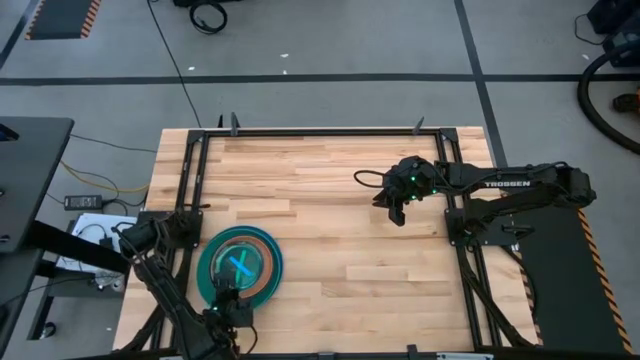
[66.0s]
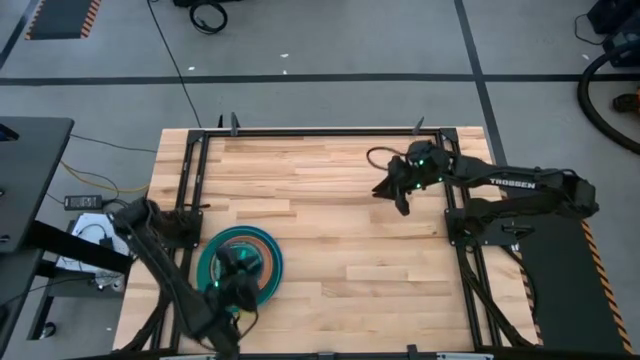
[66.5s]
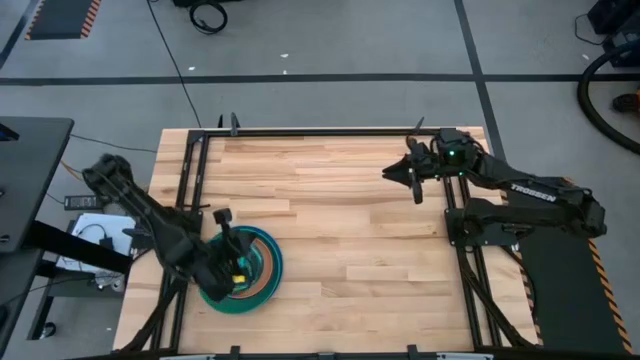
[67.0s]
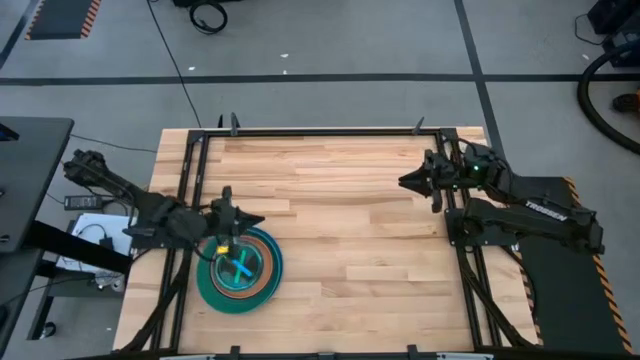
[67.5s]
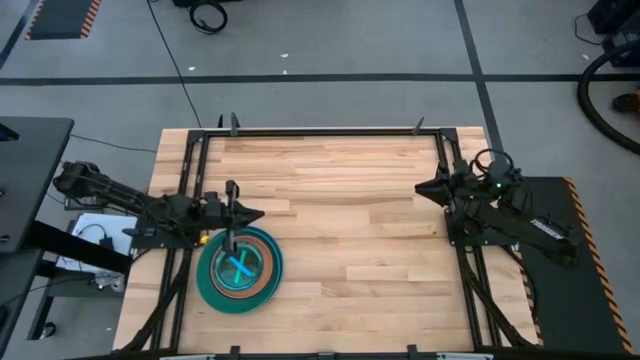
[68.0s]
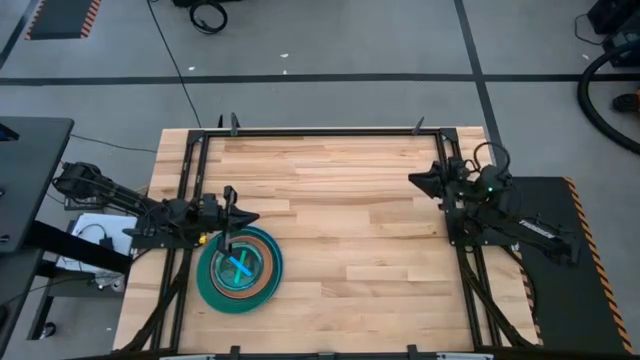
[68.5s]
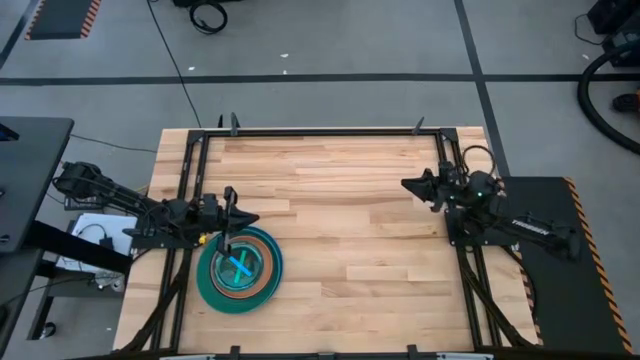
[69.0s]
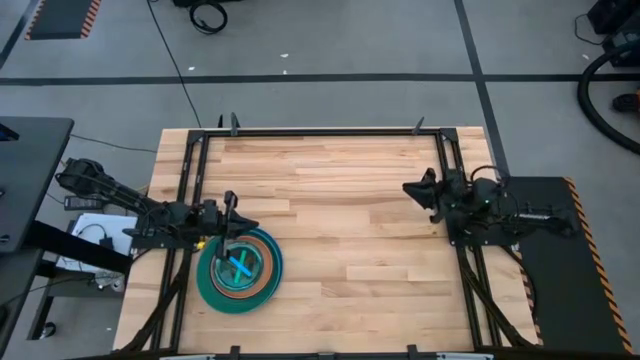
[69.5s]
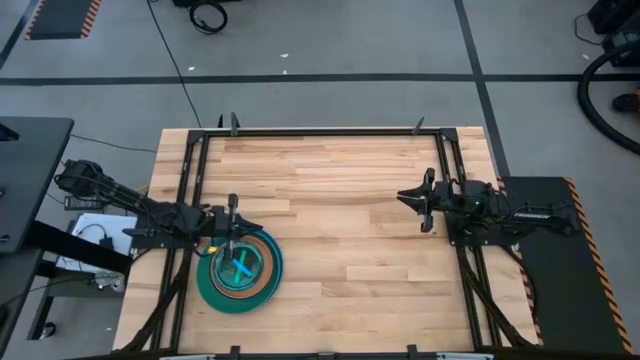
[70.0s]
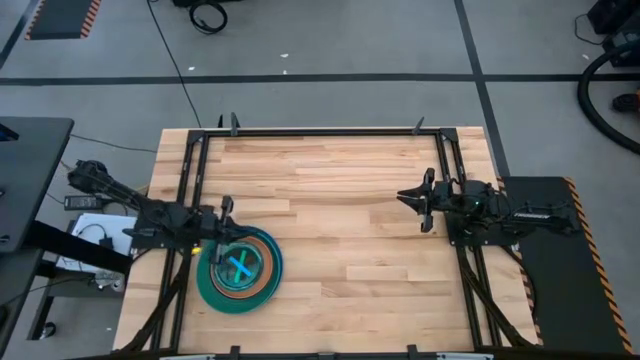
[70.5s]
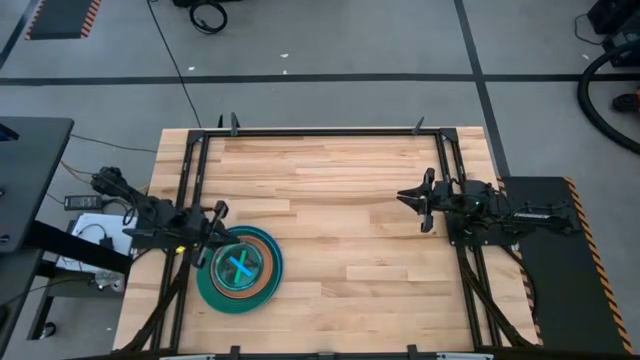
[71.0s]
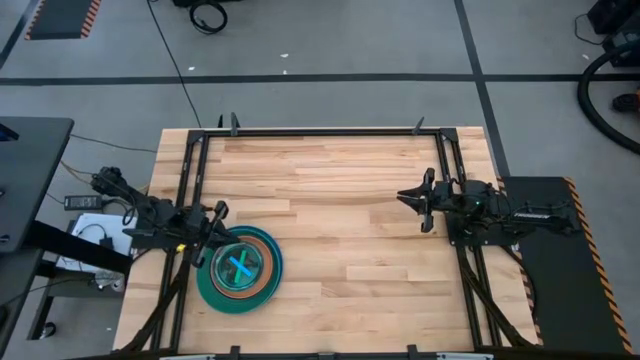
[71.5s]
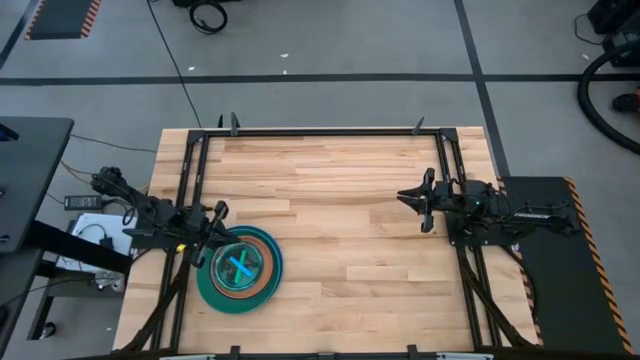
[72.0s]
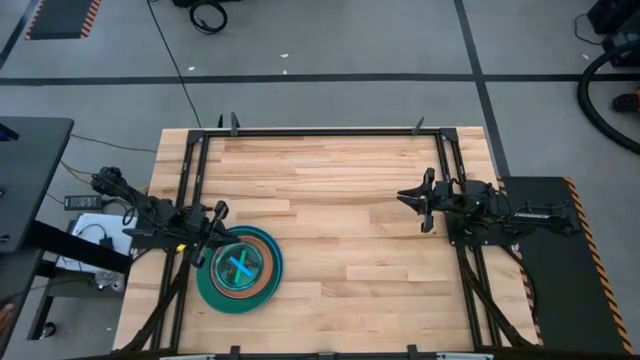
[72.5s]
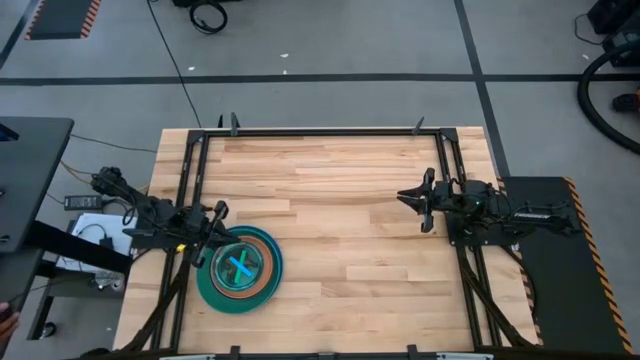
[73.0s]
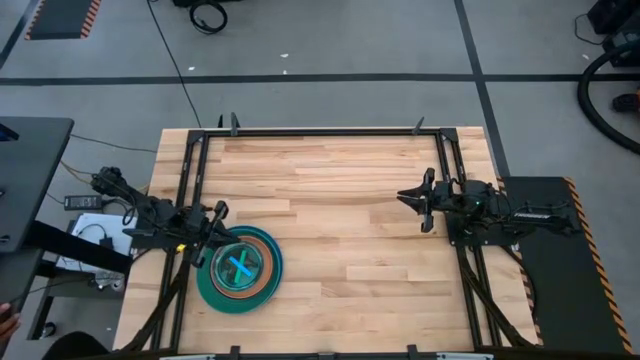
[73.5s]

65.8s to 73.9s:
Task: Stack plastic plates
Return to Home Position

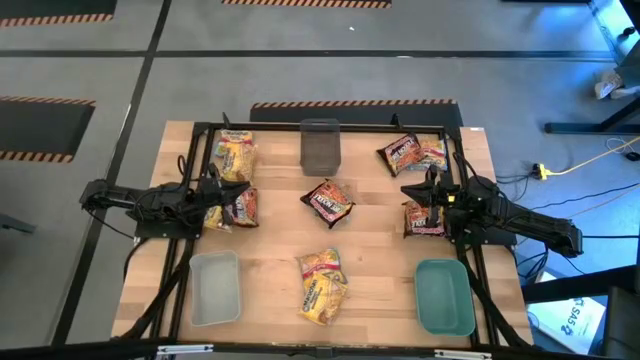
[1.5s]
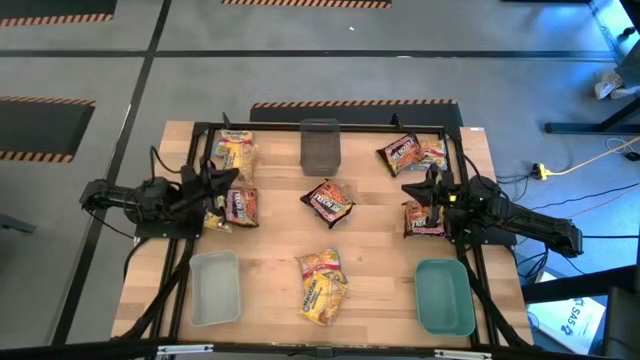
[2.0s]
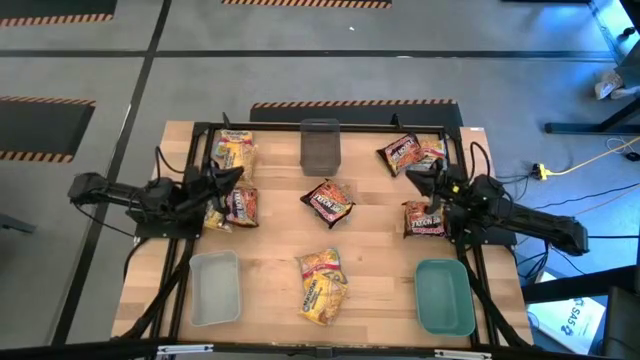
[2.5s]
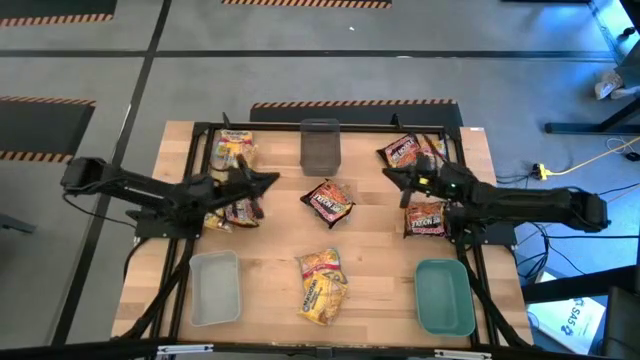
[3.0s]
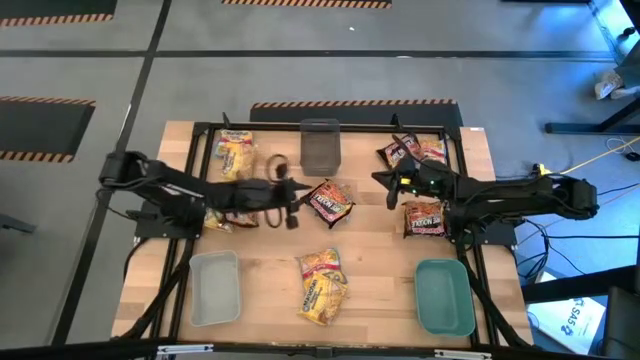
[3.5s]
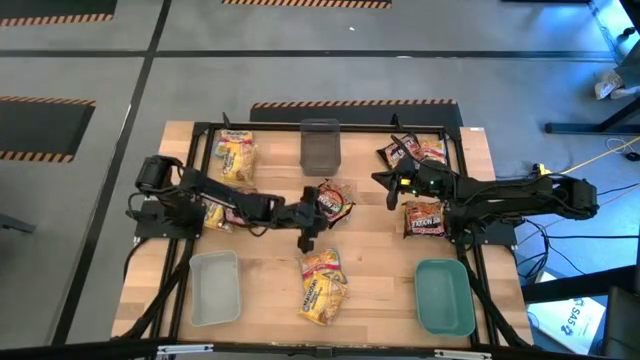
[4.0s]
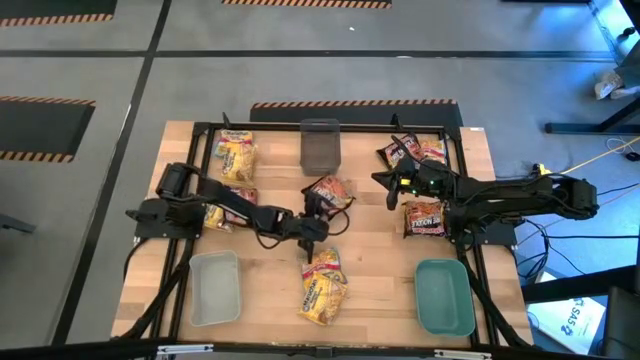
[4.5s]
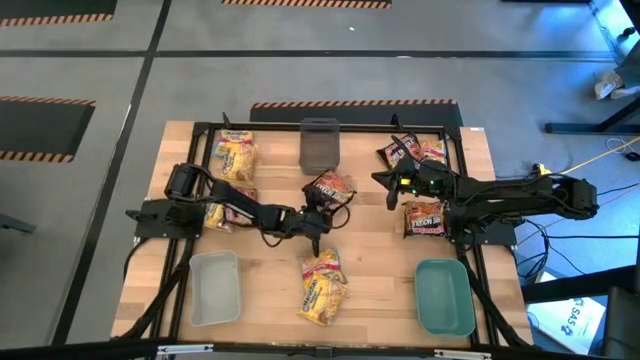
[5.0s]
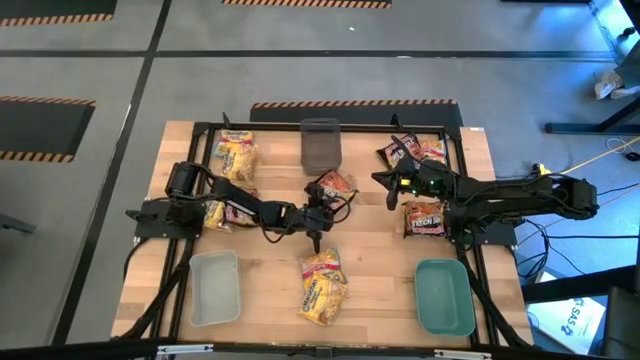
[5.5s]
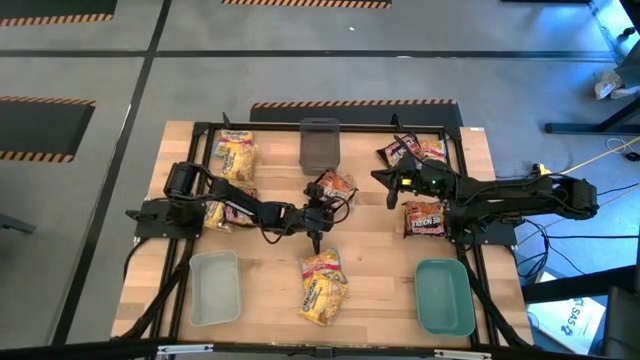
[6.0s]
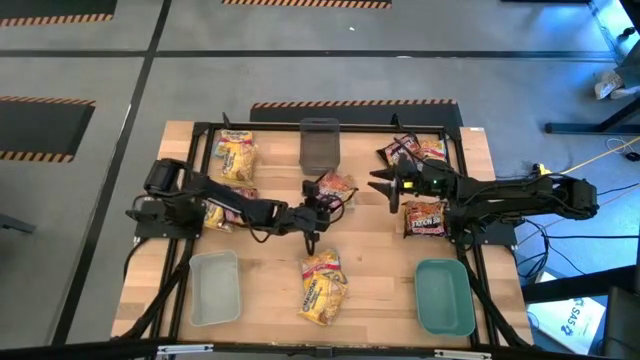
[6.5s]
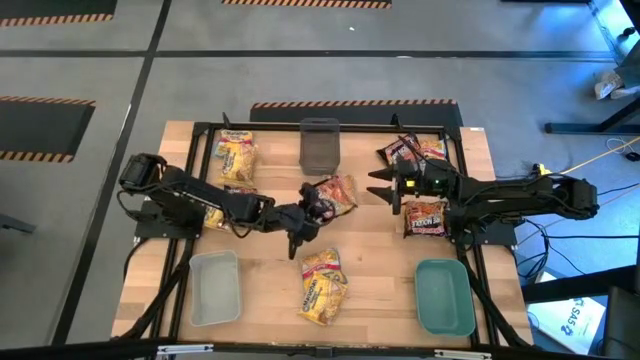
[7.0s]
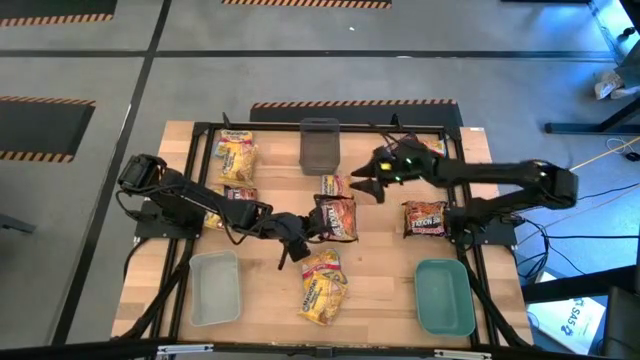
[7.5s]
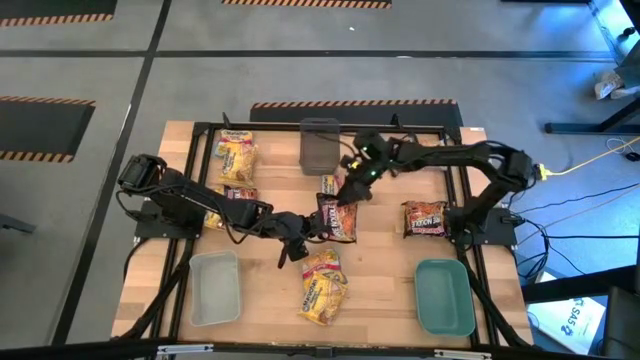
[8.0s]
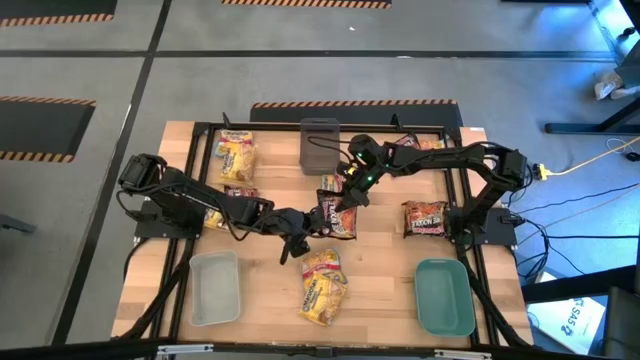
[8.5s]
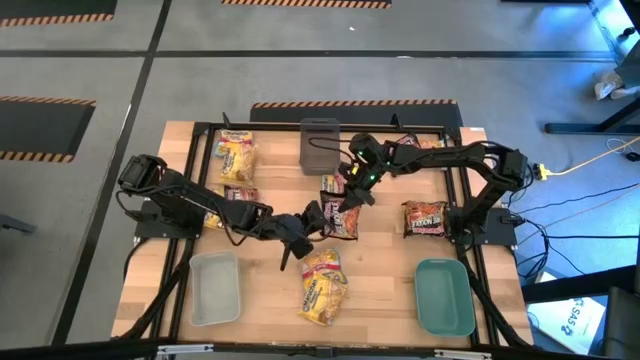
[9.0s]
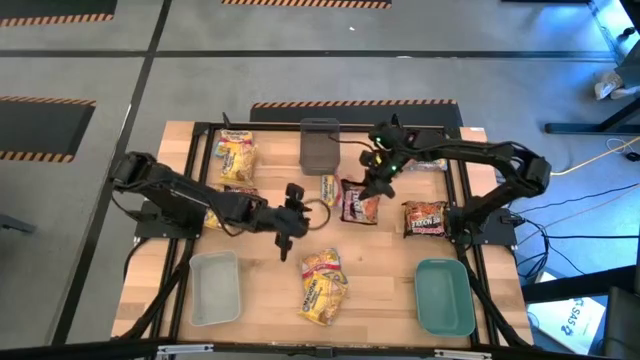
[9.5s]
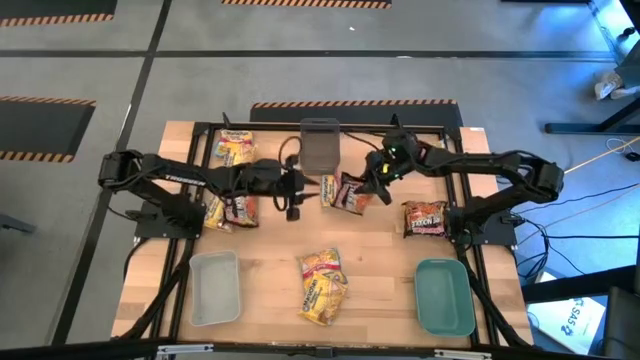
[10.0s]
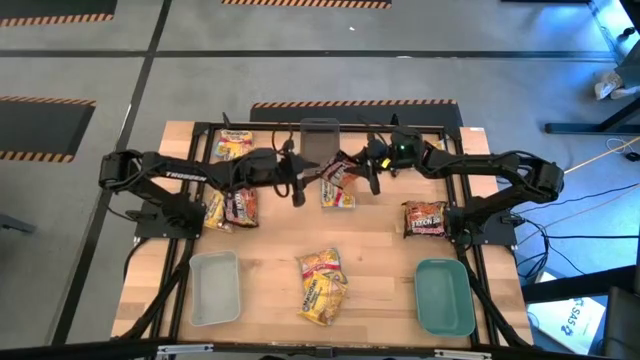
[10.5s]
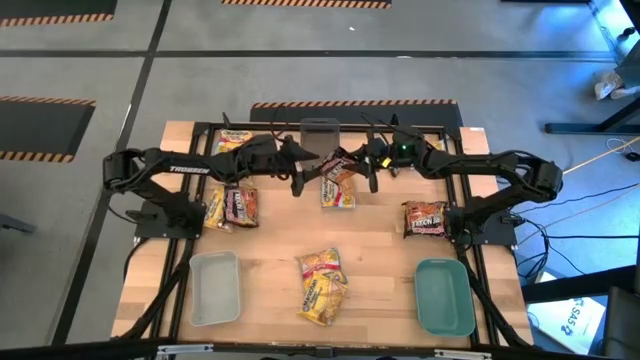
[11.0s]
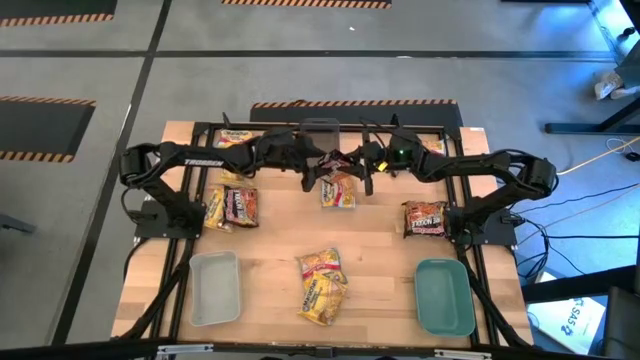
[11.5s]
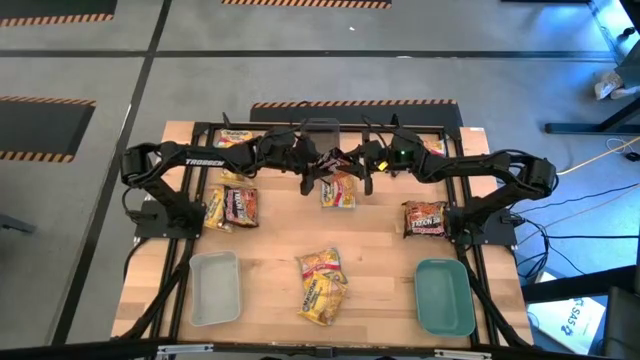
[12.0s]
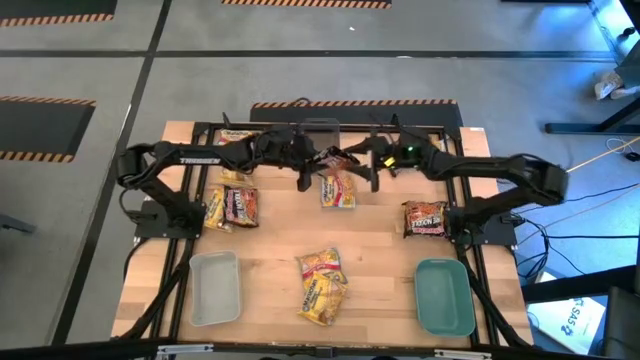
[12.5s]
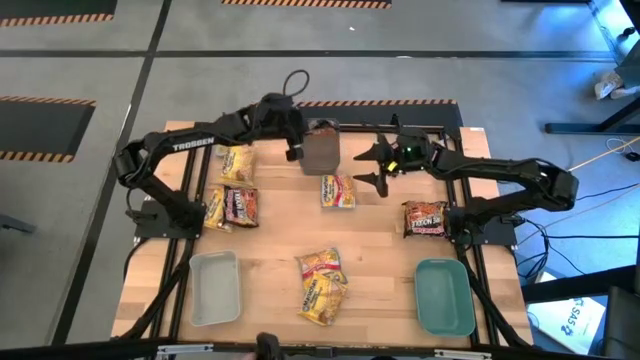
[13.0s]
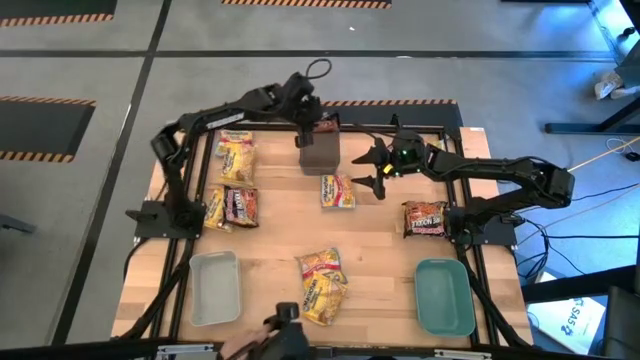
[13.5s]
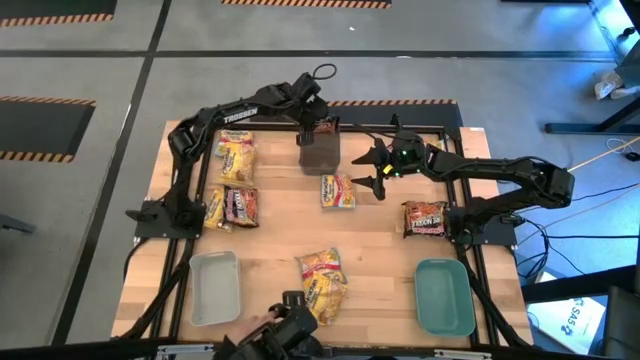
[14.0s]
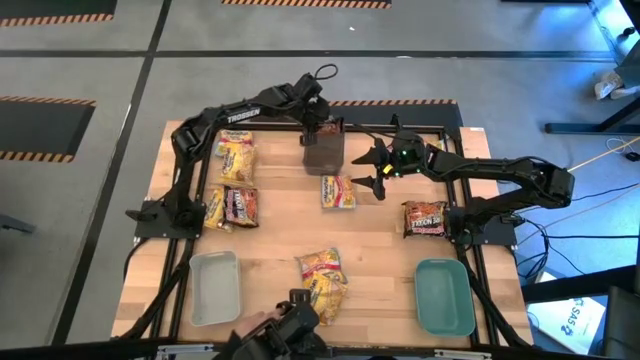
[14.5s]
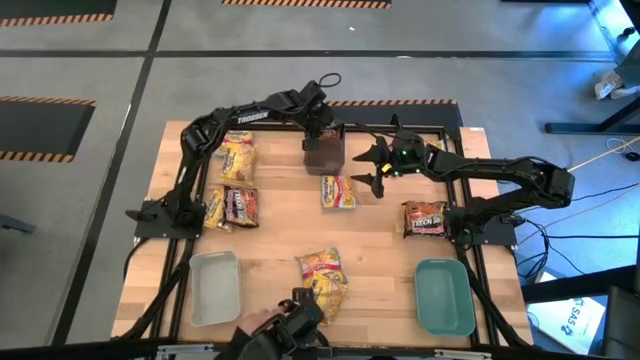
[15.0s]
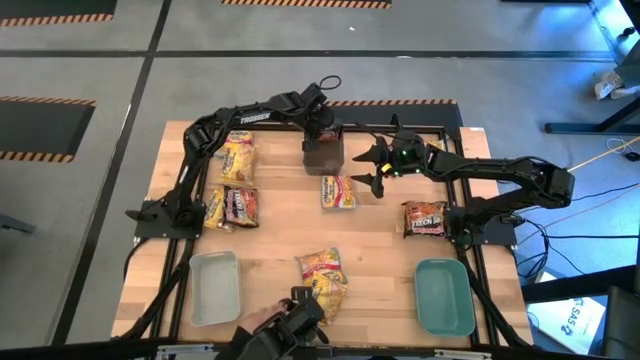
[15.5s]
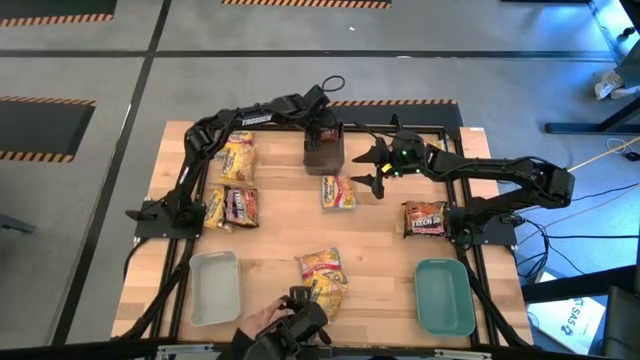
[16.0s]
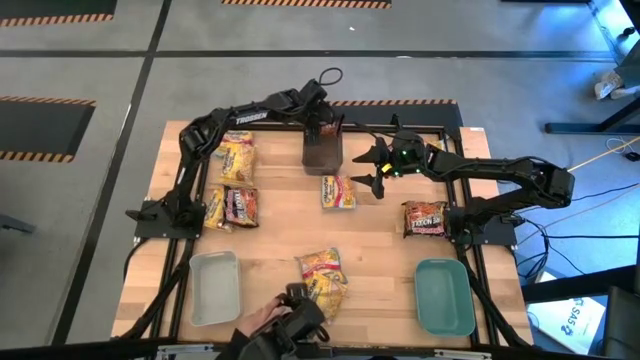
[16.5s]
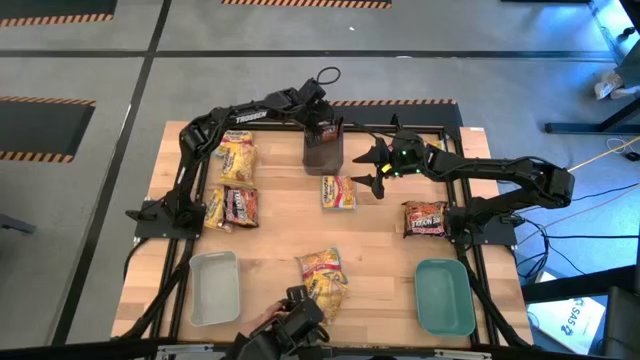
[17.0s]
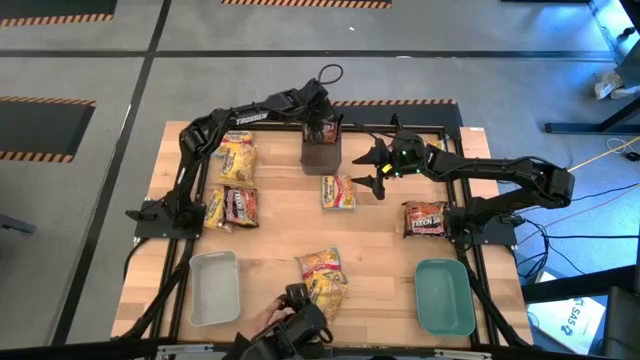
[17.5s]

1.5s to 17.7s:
Task: Sort Maruchan noodles
Put the middle black noodle pack into the black bin
